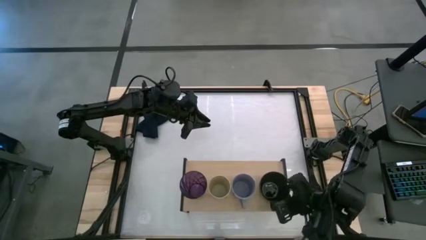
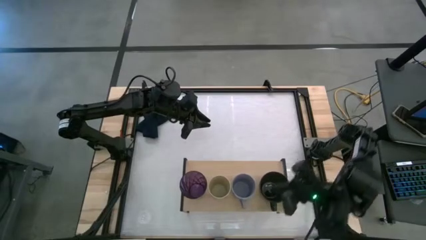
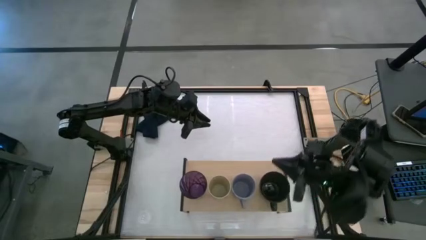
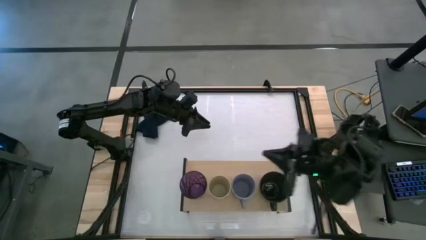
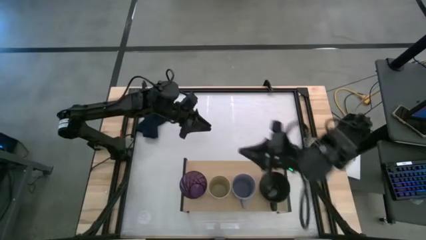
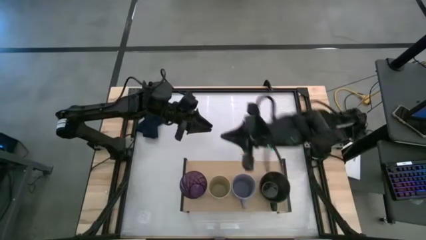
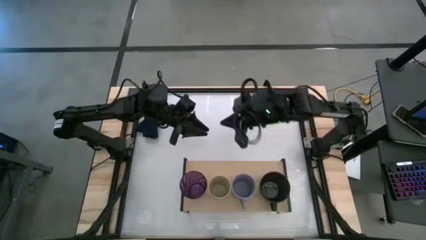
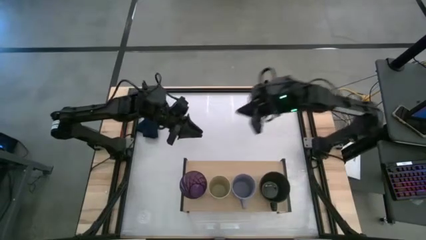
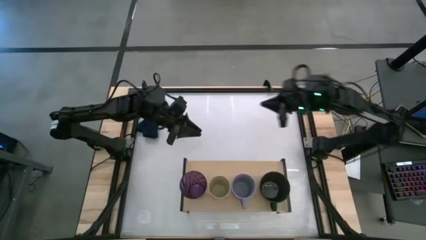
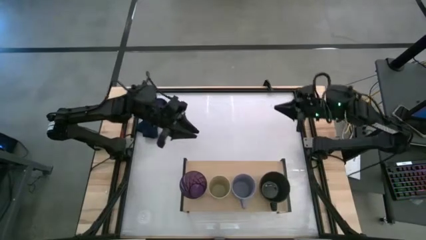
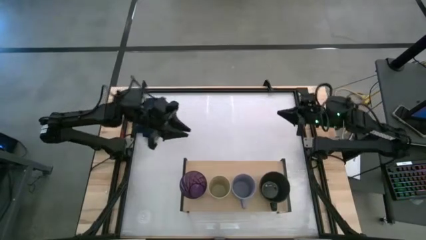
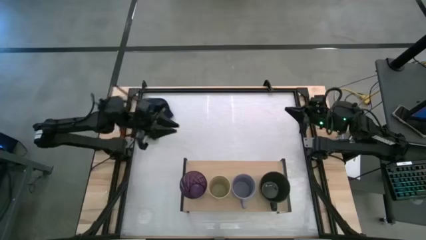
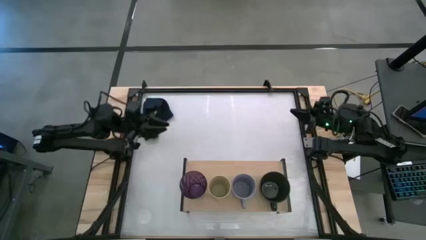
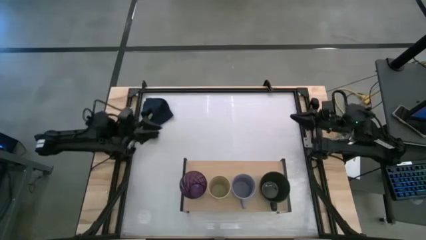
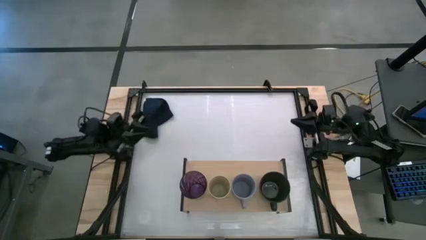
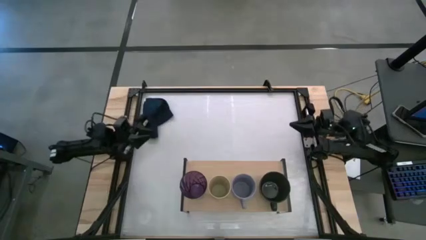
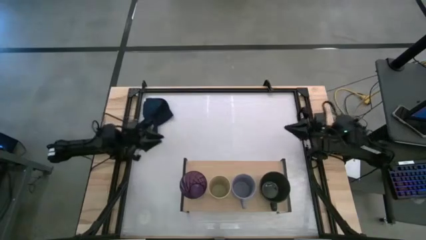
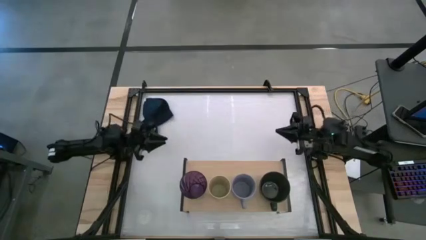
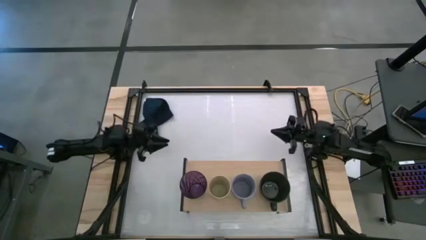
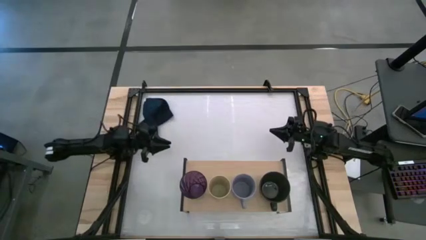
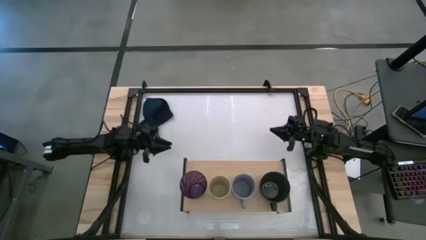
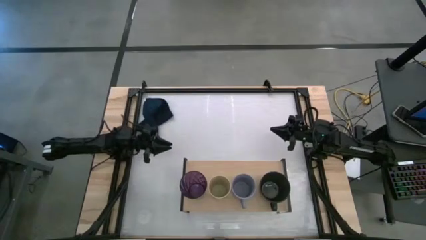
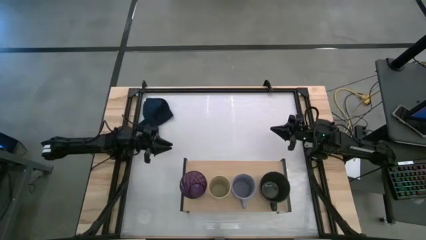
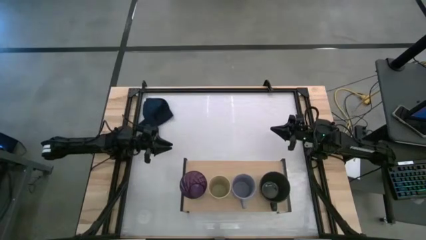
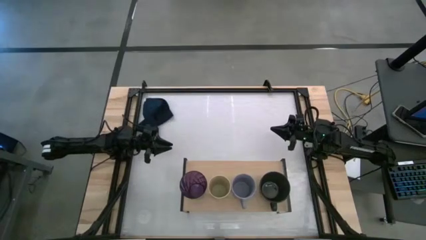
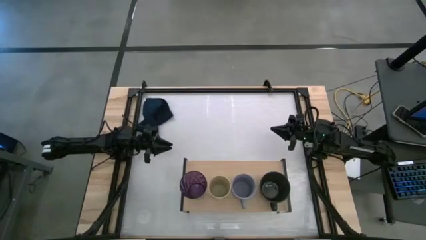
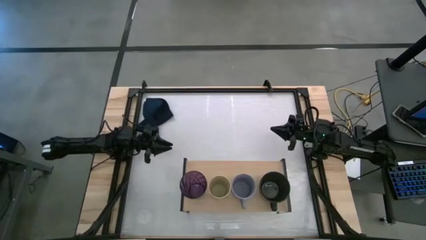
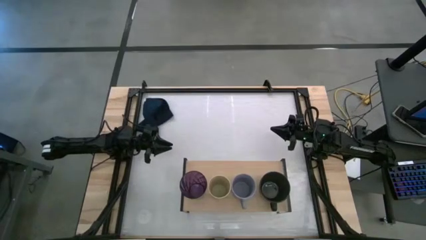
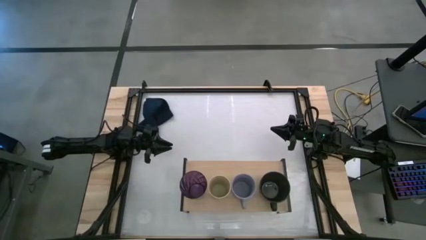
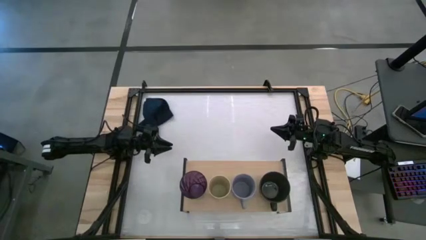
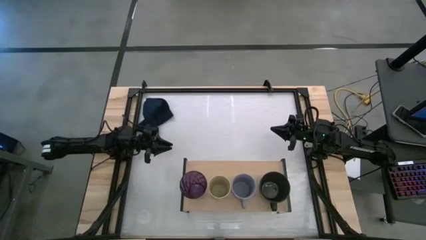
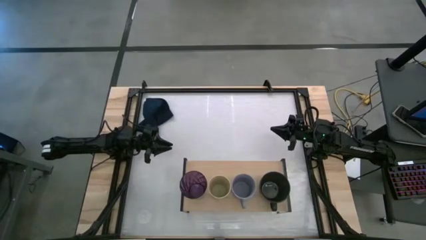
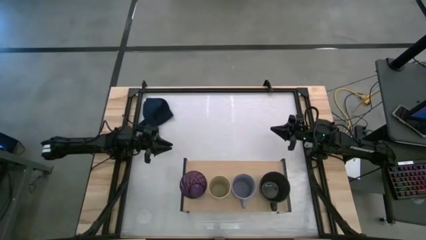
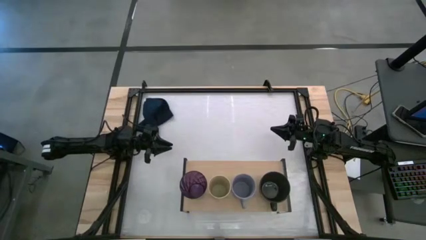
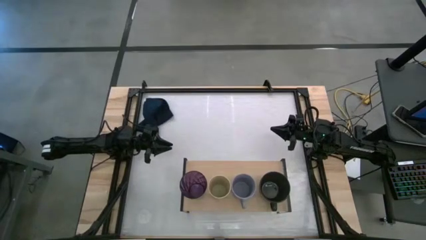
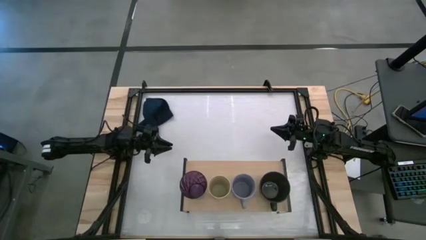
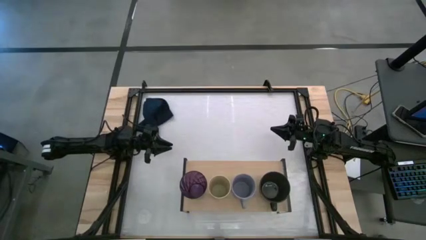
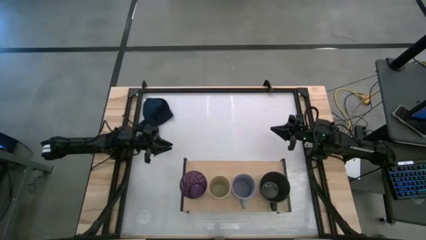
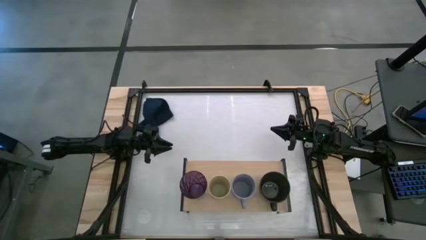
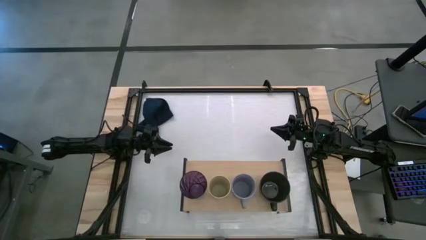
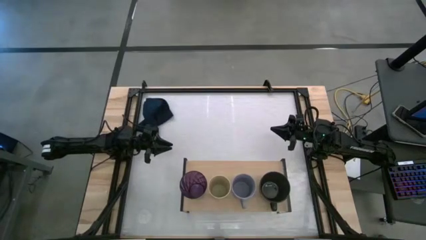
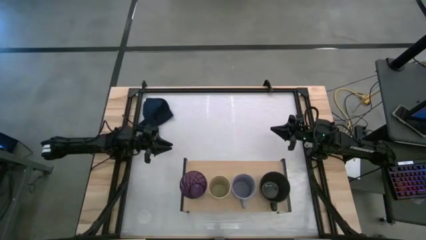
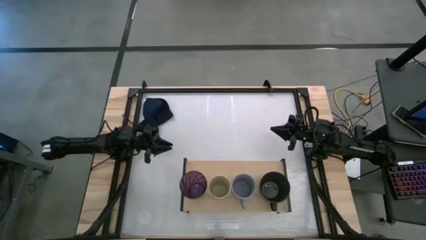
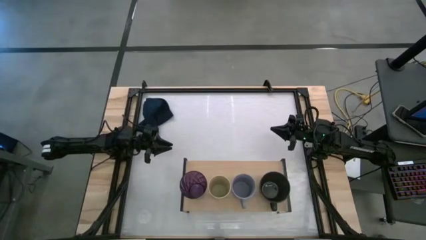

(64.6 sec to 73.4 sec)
Task: Stack small to large cups/mugs on shelf
Return to Home Position

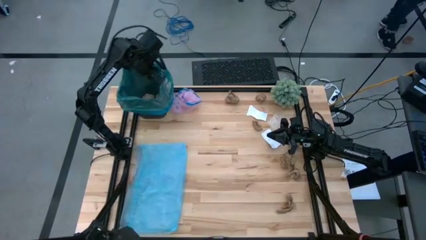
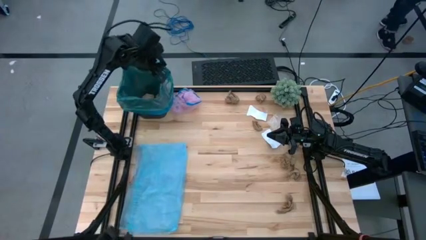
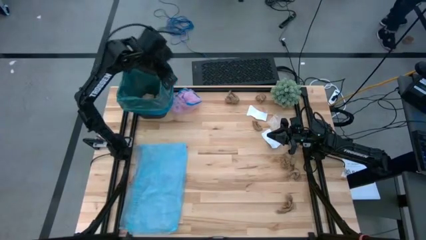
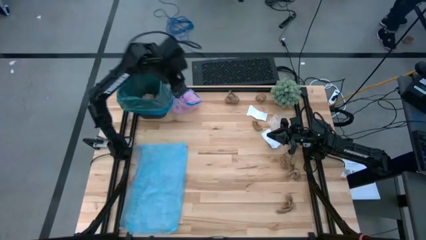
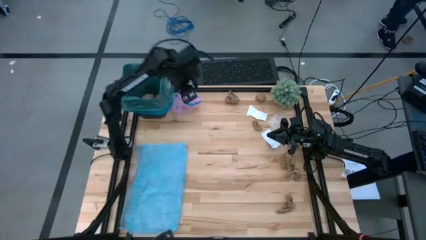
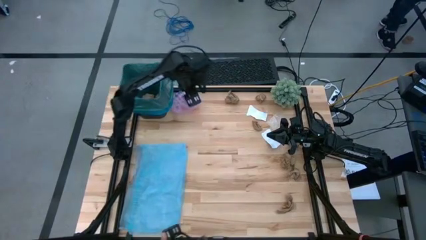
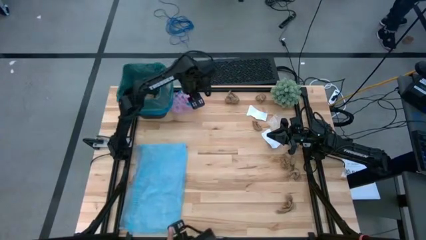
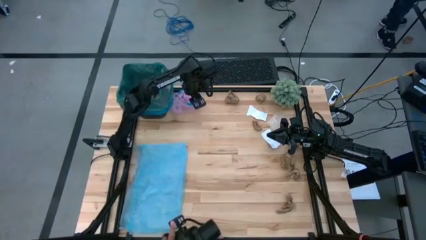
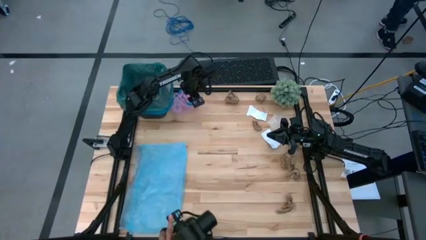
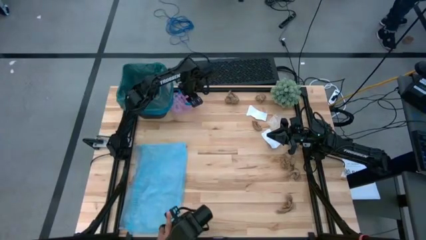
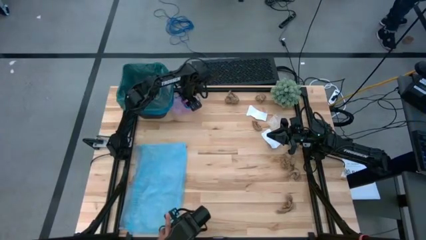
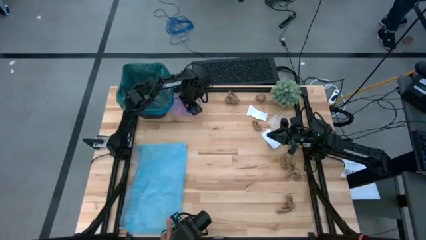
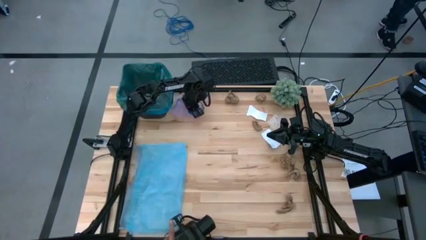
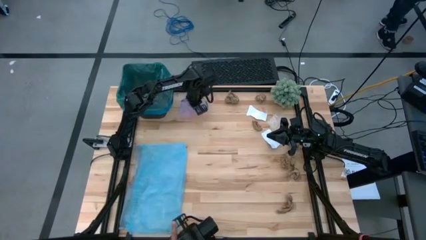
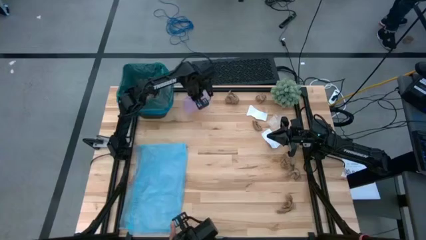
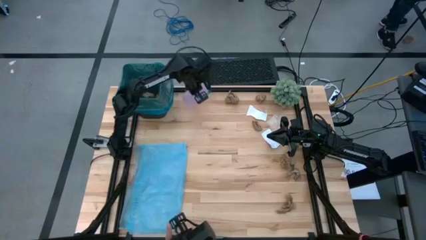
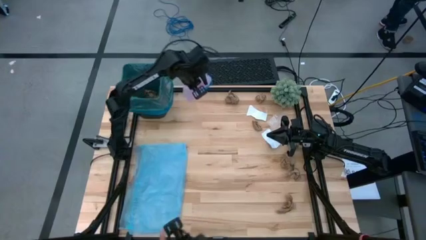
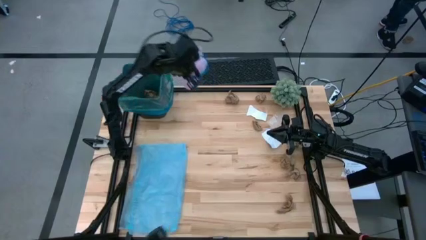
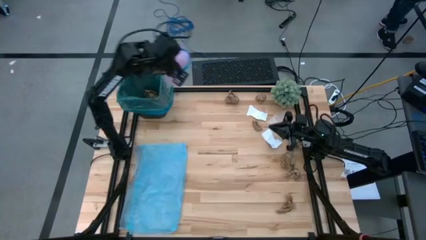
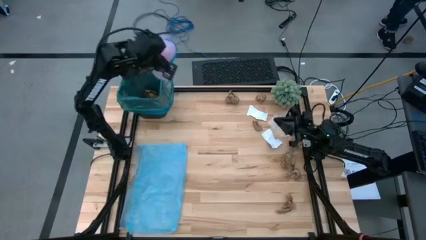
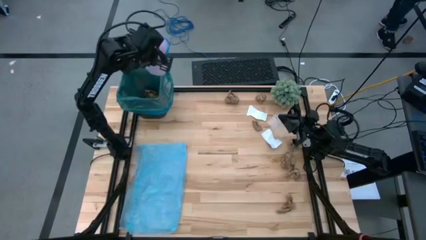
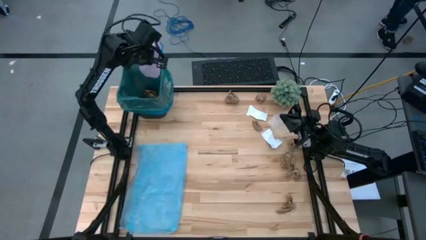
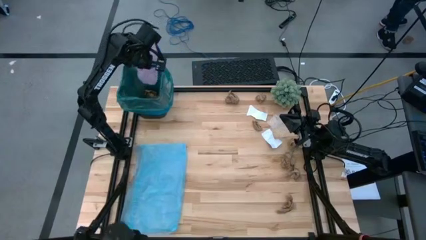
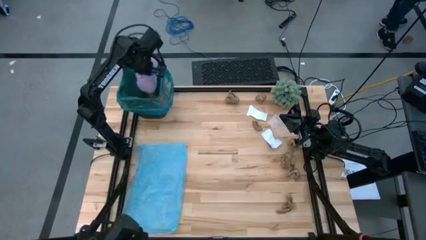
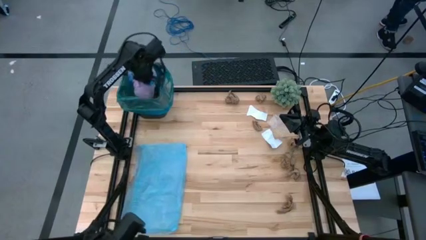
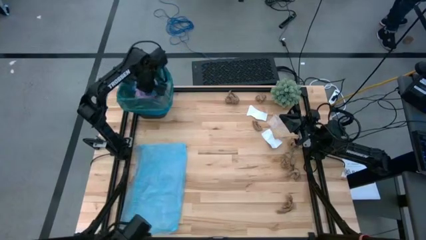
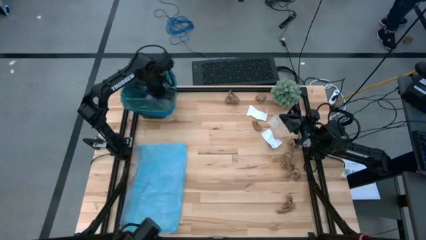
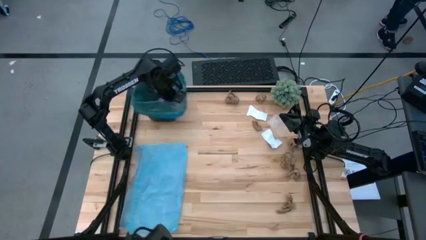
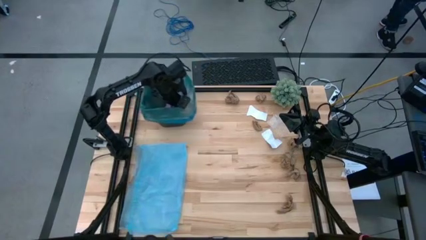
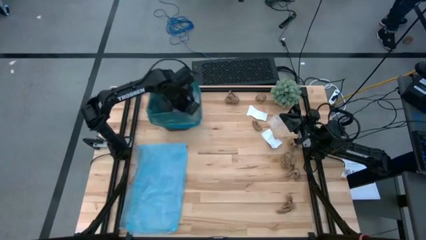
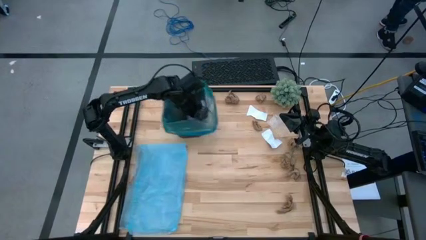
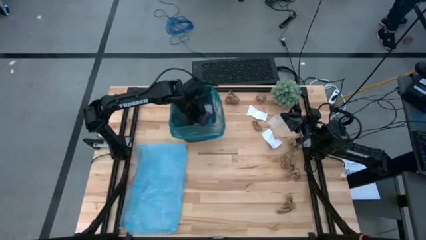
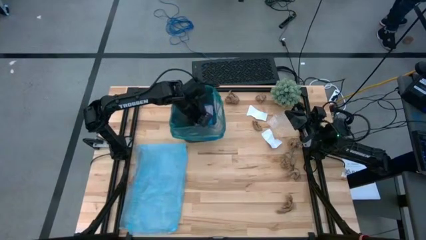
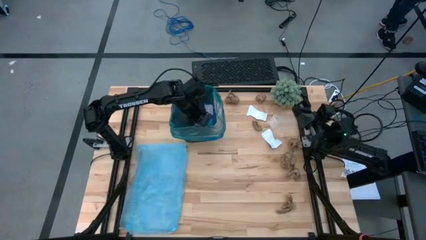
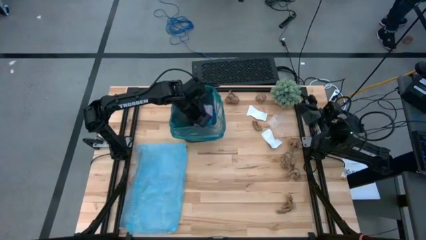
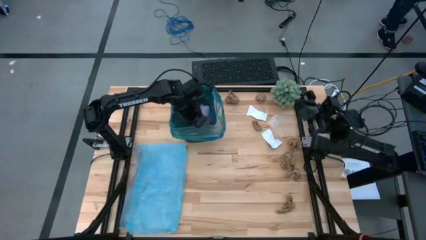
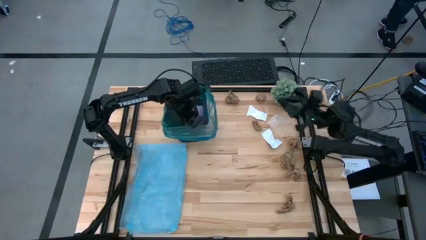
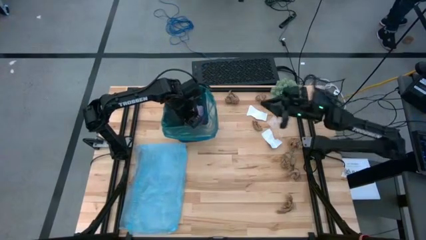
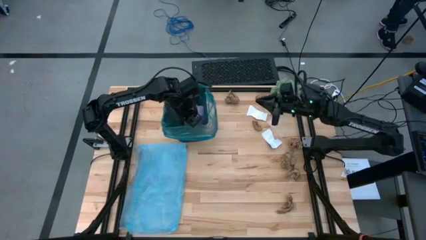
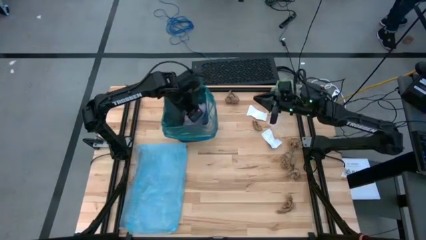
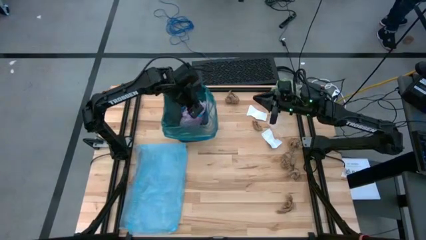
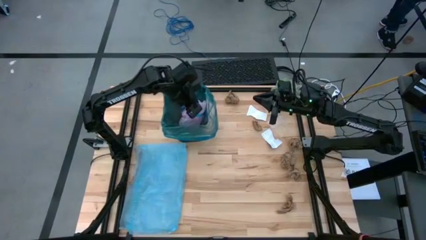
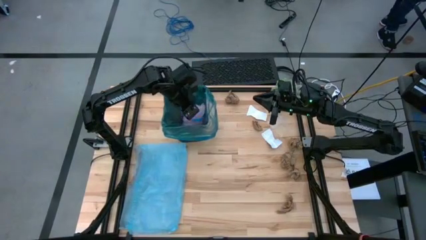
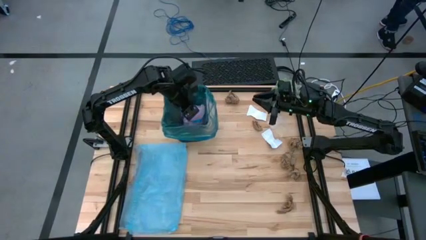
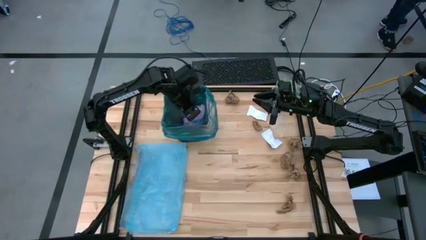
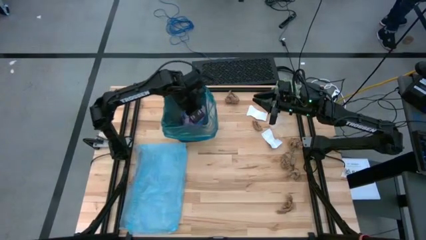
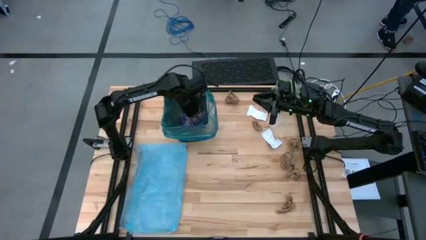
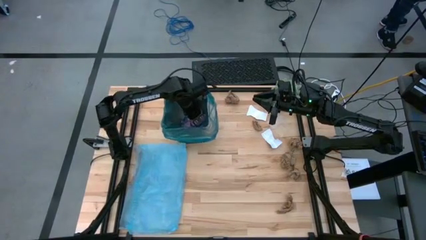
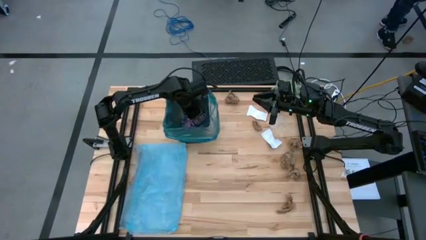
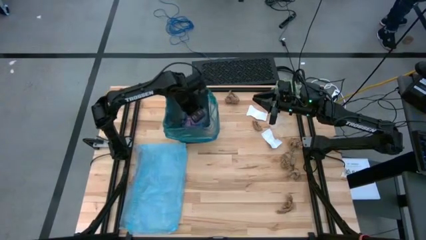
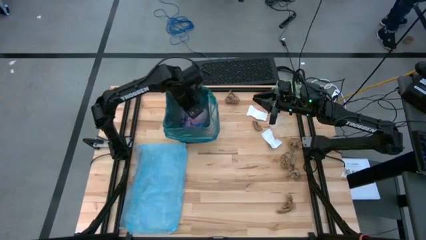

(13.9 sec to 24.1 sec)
Task: place trash/remove bag and relplace
Put the pink trash bag into the trash bin
